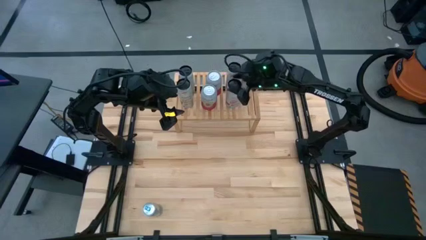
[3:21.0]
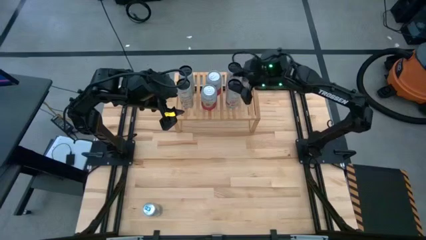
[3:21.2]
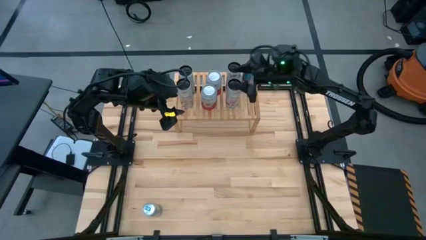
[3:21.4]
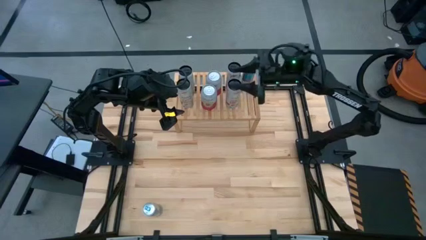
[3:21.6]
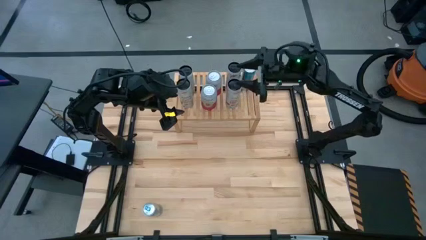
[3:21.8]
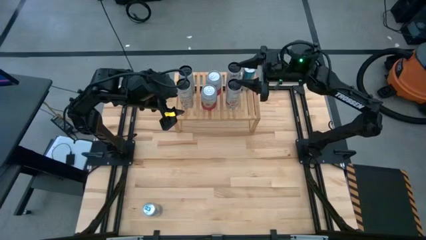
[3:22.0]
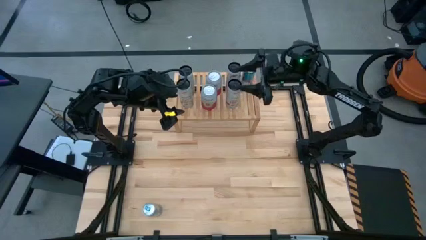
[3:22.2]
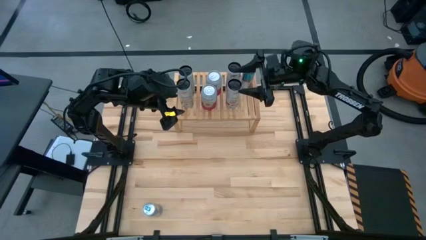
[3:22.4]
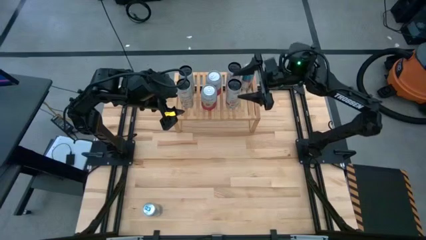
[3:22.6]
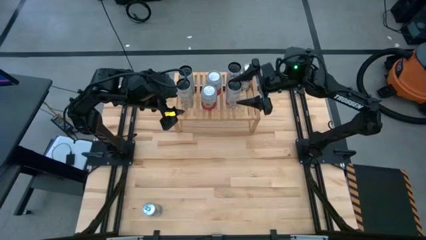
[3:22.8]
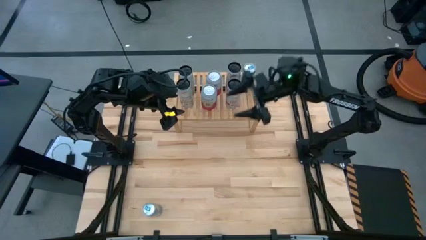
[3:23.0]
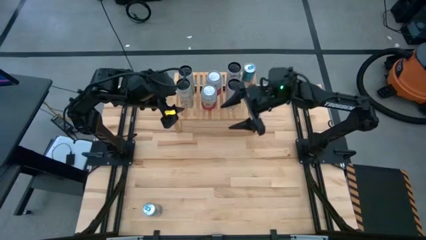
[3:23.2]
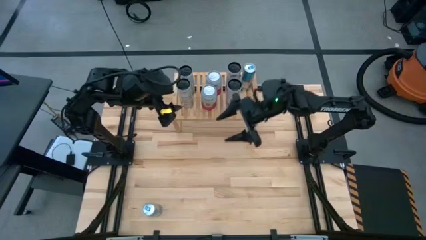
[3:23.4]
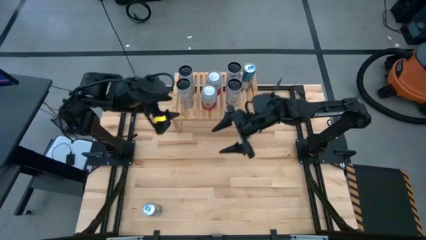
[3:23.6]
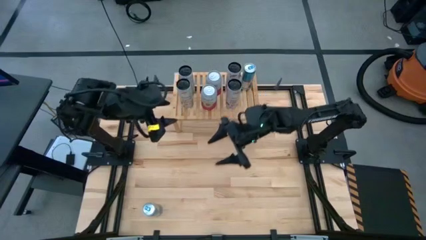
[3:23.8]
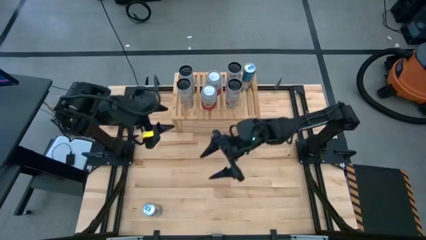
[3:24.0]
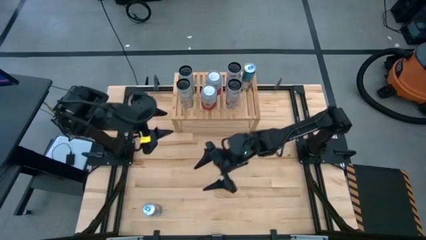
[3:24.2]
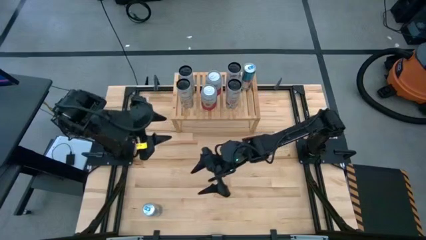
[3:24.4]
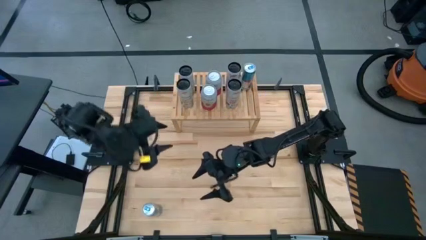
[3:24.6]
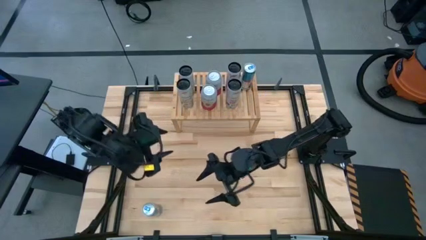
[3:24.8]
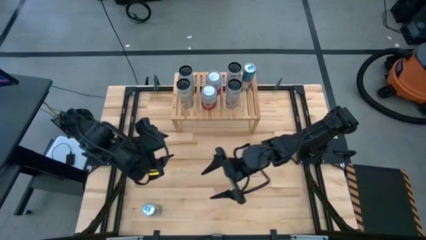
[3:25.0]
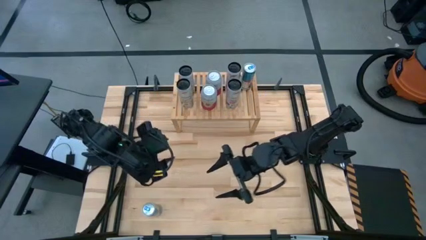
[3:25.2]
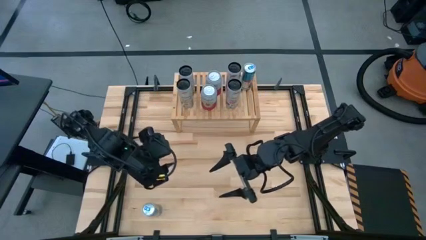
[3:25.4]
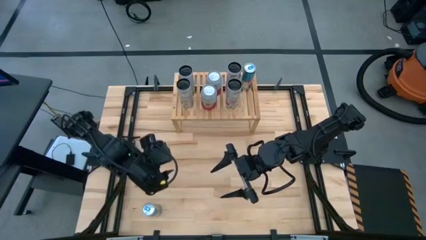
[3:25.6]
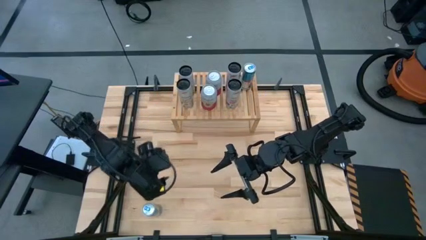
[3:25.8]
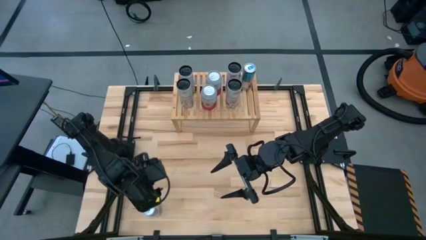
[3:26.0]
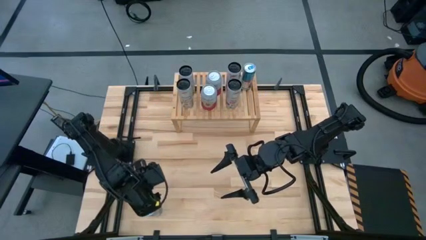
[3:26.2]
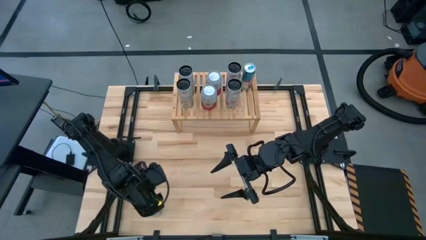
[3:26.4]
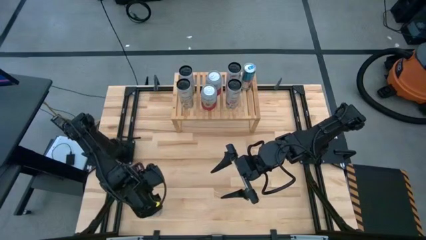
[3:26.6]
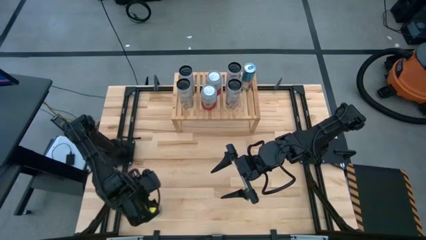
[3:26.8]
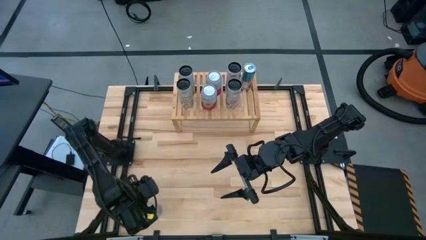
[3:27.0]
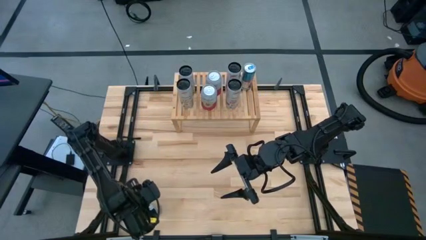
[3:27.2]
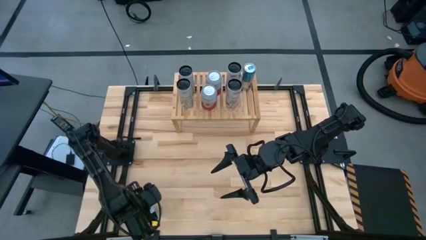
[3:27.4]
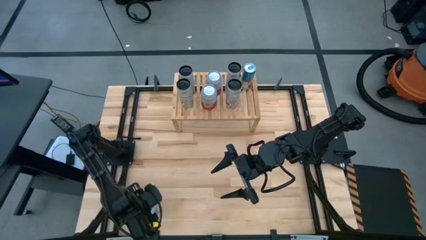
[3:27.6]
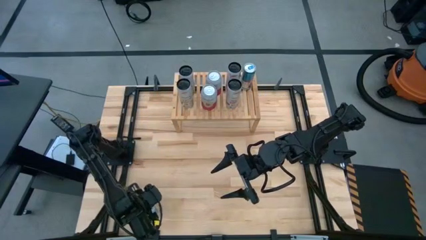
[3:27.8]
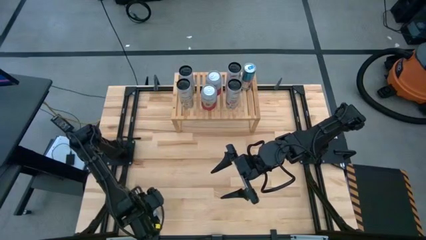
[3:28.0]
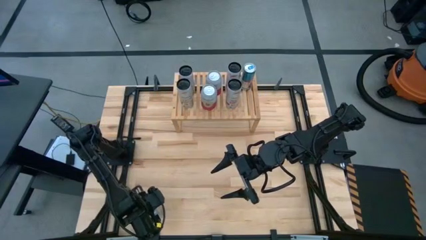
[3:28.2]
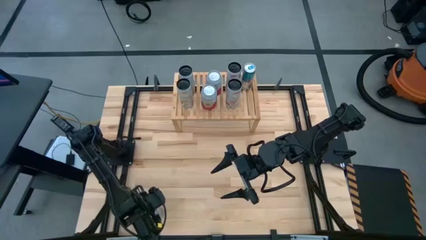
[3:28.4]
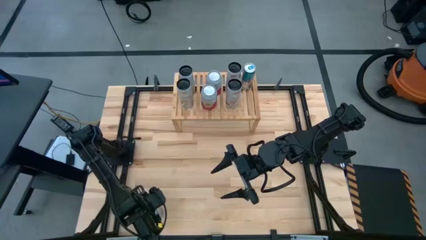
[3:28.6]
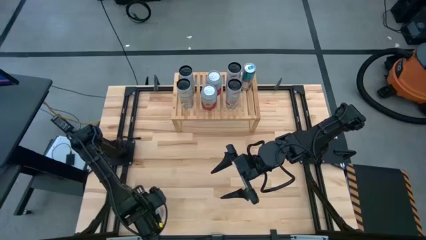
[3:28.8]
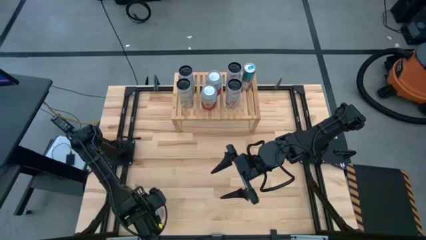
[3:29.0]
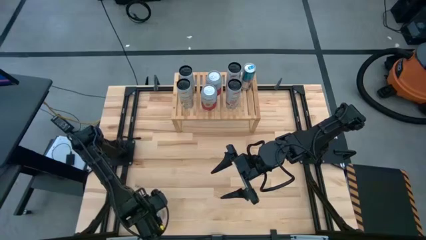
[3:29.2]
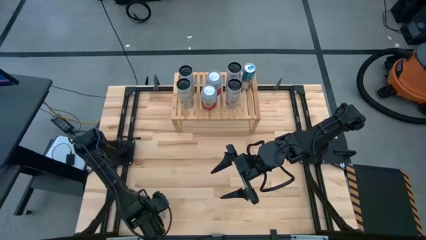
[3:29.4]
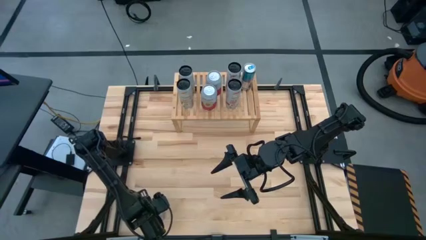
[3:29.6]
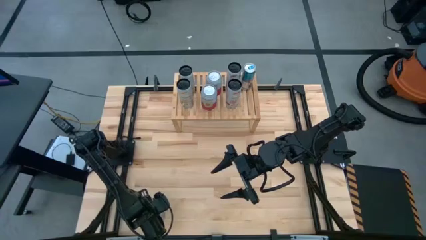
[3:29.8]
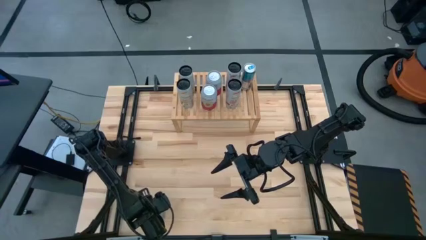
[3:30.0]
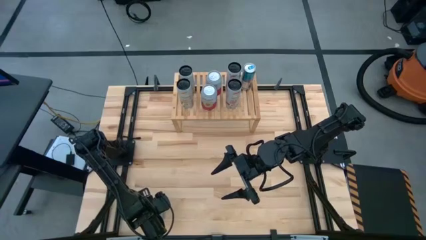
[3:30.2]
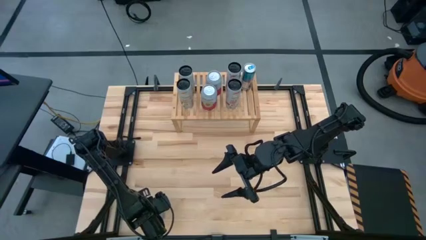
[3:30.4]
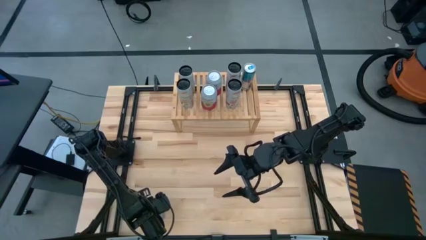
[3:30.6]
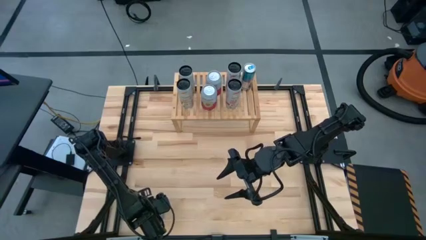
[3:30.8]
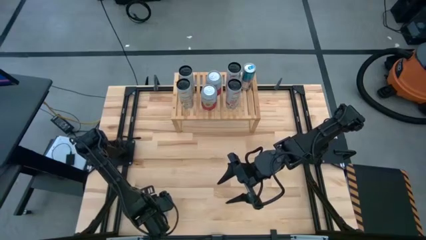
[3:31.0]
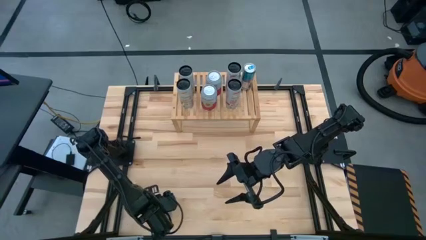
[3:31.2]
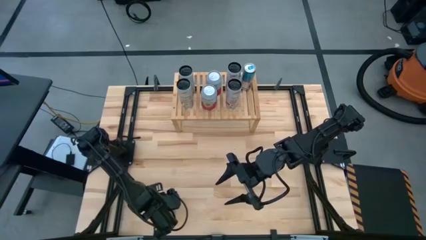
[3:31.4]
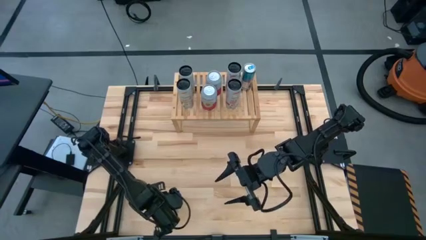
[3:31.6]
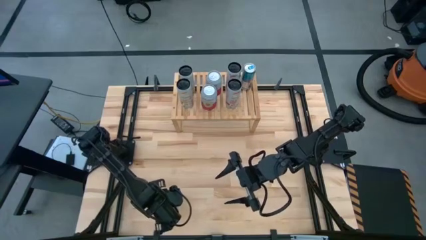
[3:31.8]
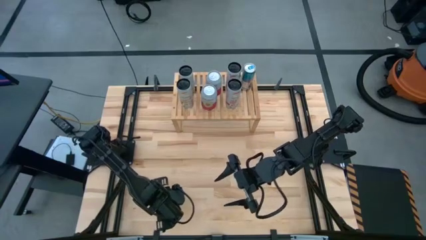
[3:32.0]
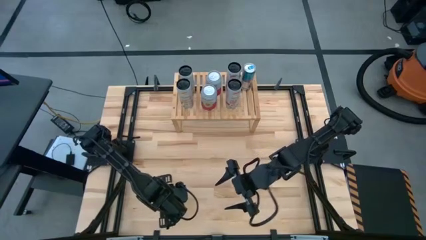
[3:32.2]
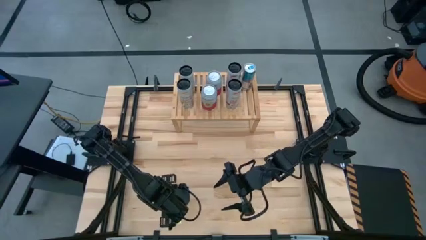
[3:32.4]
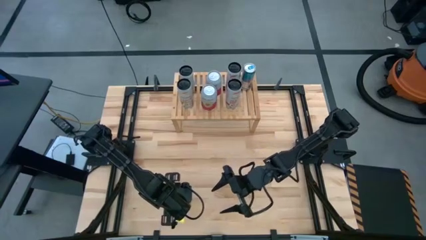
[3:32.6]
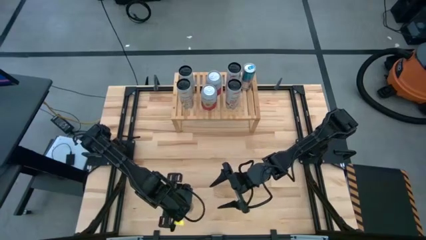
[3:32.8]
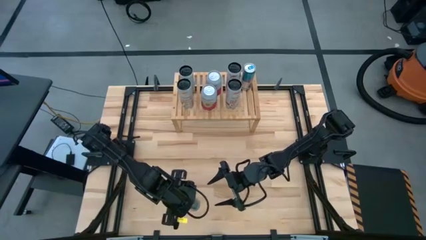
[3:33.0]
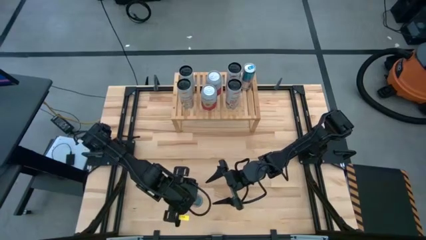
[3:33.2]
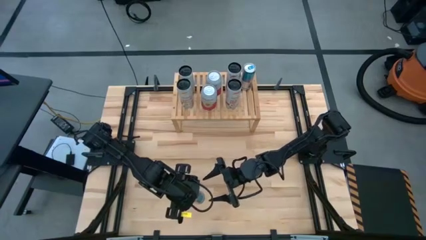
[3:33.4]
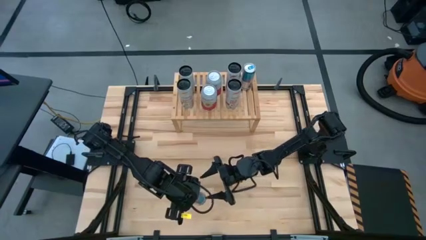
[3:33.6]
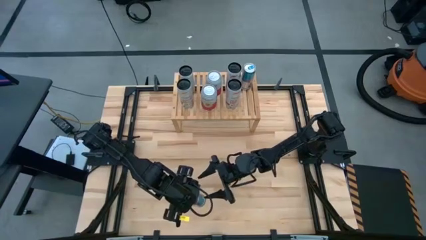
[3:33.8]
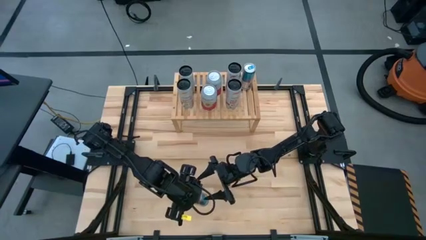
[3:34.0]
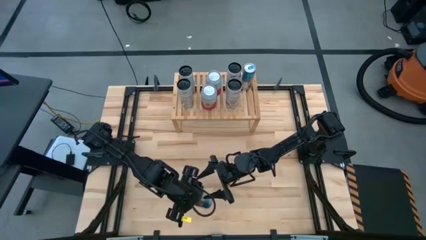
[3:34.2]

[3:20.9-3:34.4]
Task: Place canned beverage on shelf
Put the blue soda can on the shelf aligned with the other blue soda can
